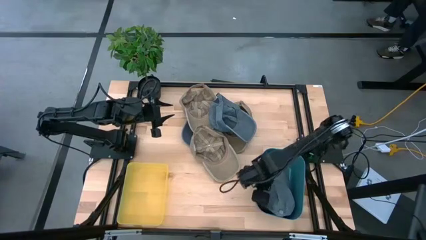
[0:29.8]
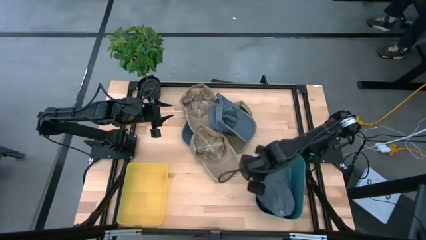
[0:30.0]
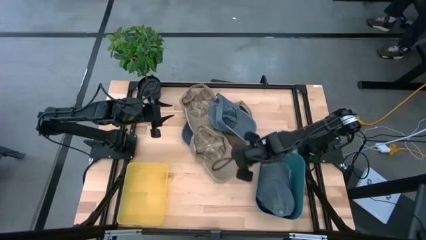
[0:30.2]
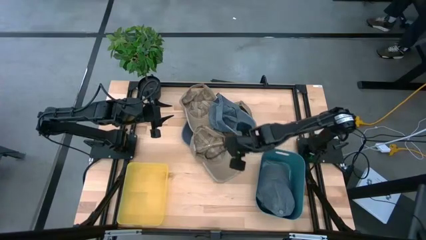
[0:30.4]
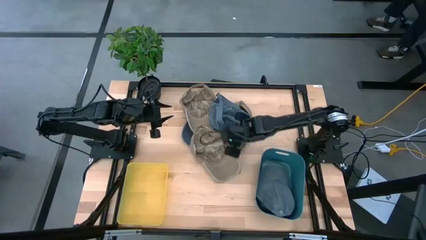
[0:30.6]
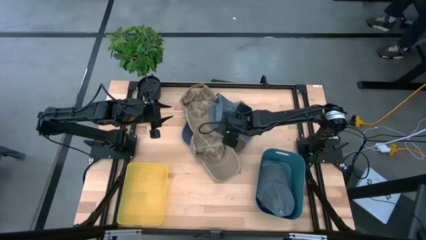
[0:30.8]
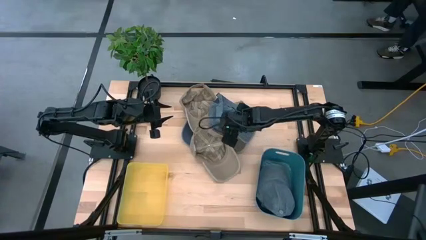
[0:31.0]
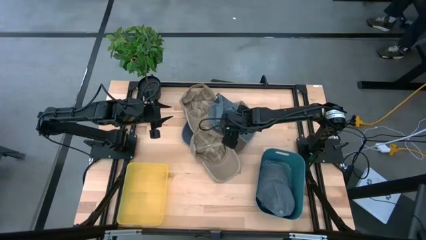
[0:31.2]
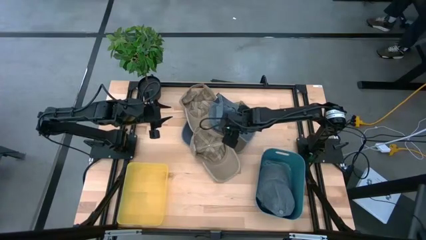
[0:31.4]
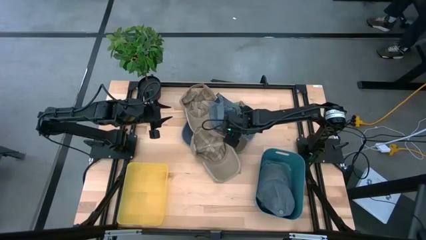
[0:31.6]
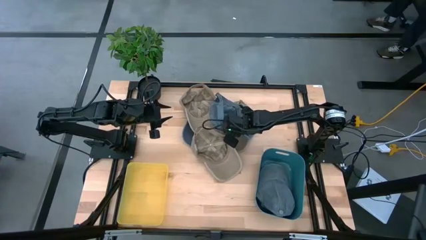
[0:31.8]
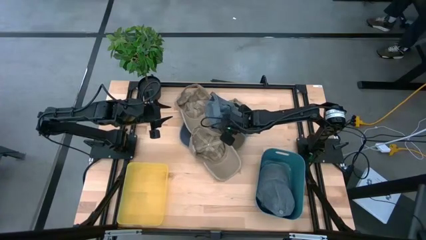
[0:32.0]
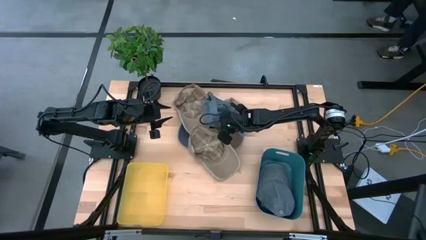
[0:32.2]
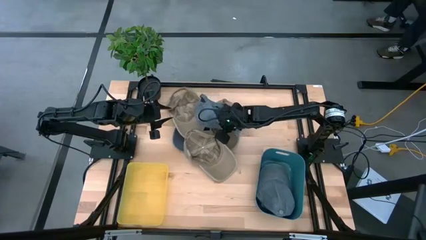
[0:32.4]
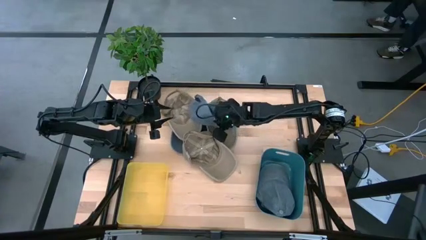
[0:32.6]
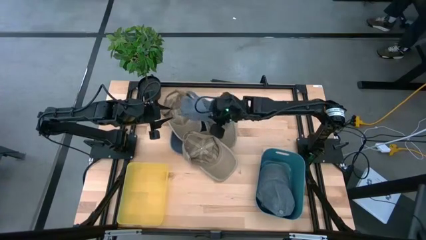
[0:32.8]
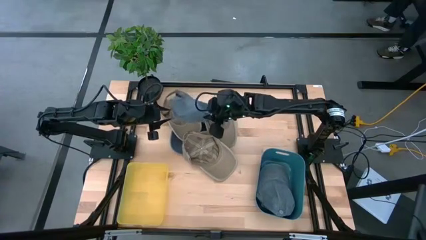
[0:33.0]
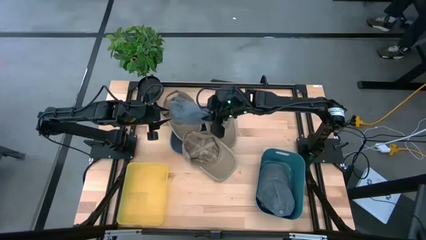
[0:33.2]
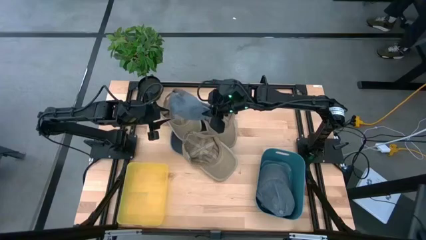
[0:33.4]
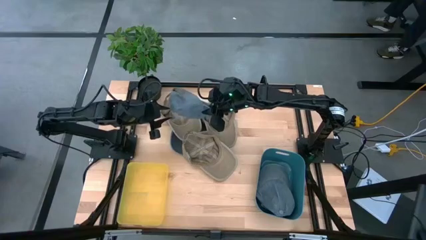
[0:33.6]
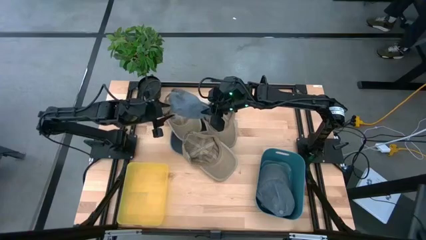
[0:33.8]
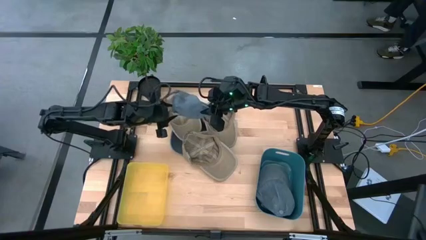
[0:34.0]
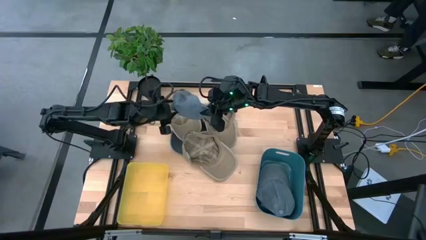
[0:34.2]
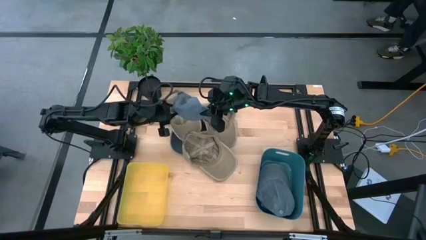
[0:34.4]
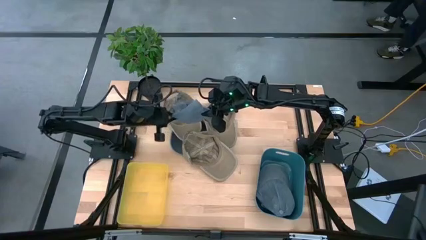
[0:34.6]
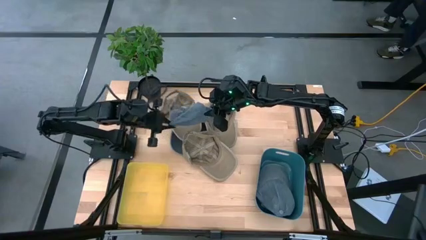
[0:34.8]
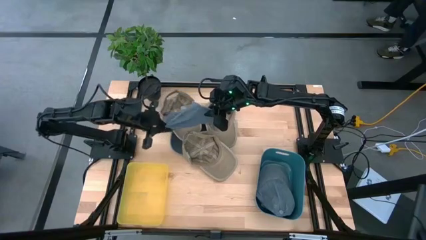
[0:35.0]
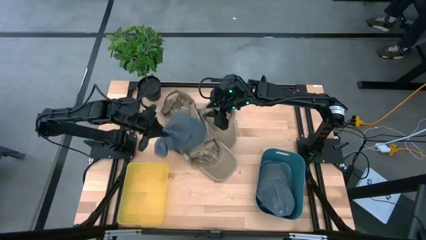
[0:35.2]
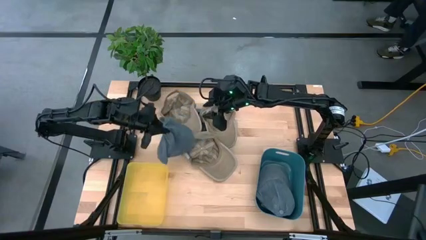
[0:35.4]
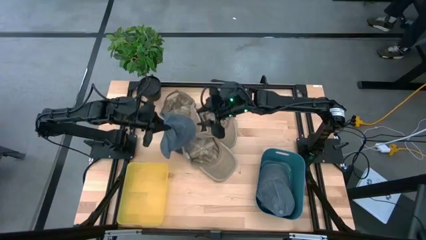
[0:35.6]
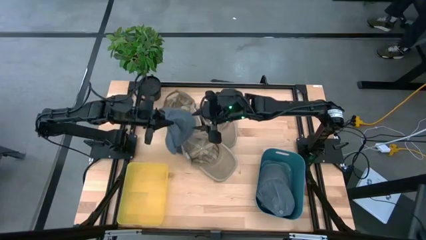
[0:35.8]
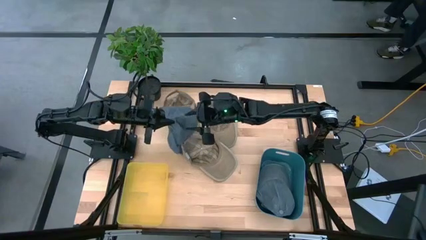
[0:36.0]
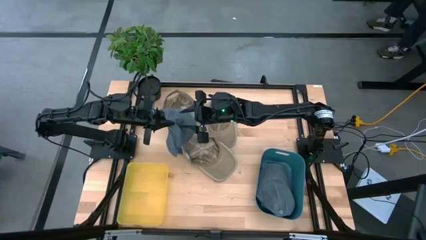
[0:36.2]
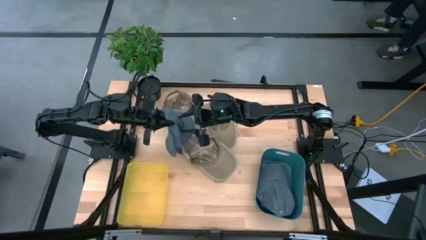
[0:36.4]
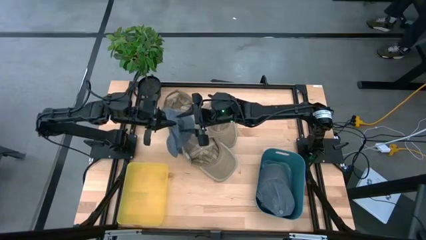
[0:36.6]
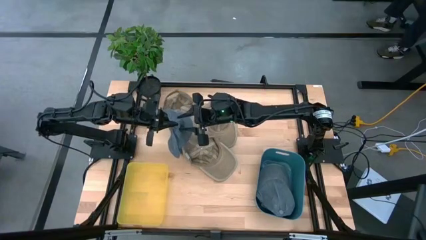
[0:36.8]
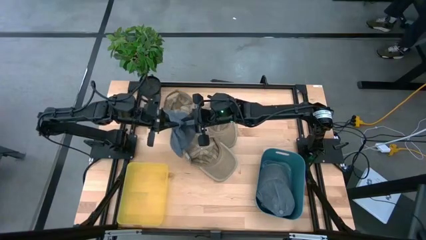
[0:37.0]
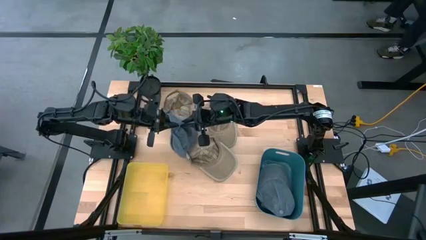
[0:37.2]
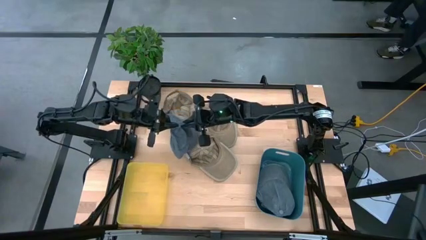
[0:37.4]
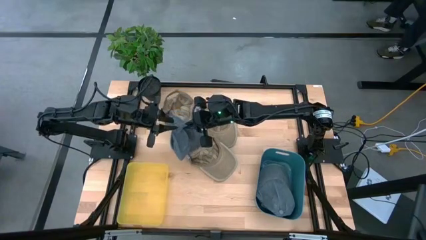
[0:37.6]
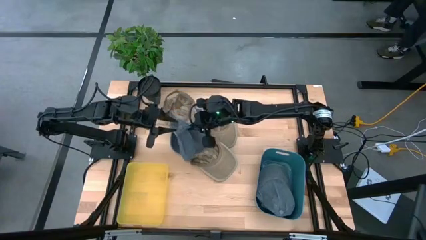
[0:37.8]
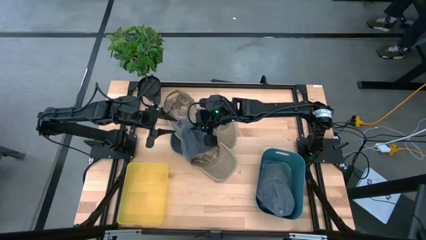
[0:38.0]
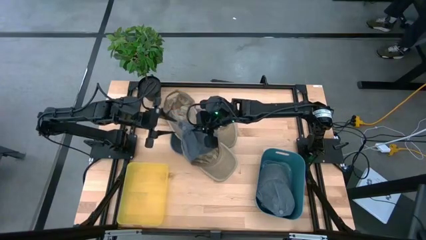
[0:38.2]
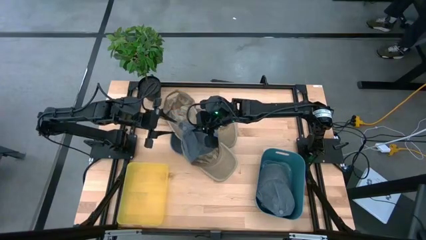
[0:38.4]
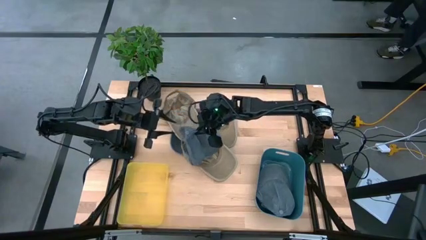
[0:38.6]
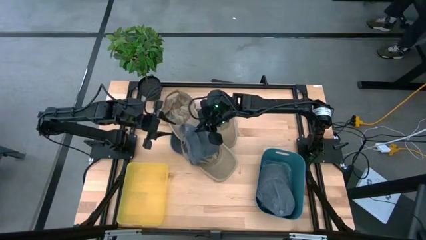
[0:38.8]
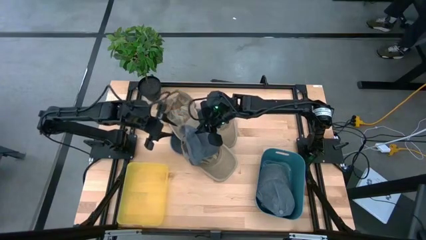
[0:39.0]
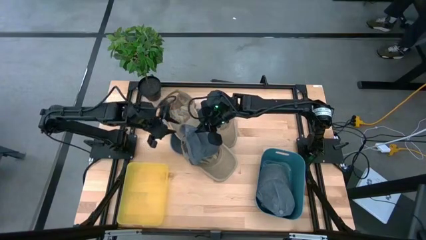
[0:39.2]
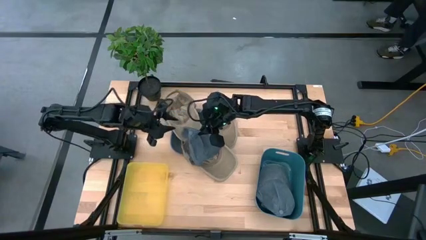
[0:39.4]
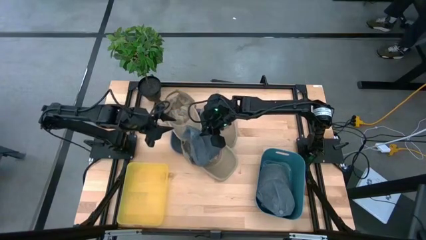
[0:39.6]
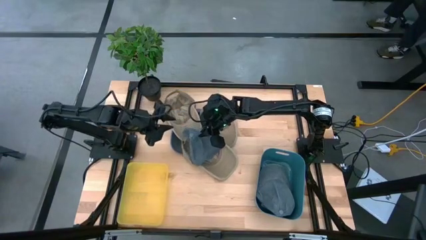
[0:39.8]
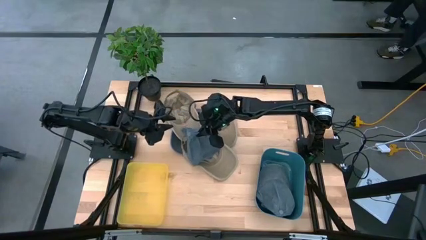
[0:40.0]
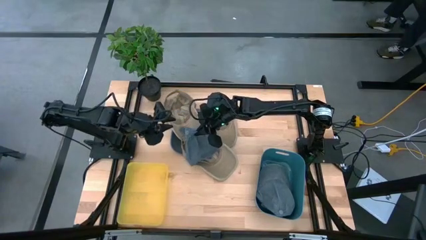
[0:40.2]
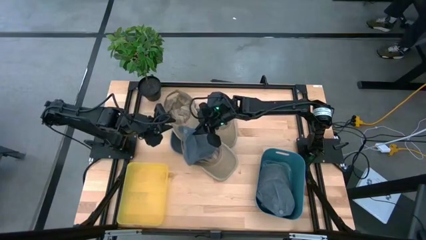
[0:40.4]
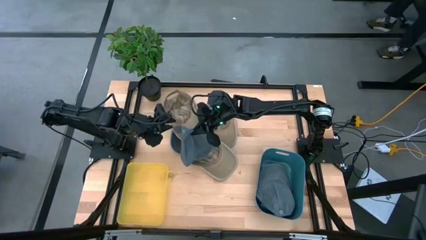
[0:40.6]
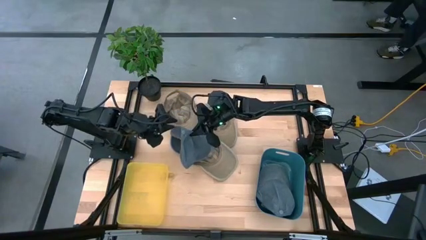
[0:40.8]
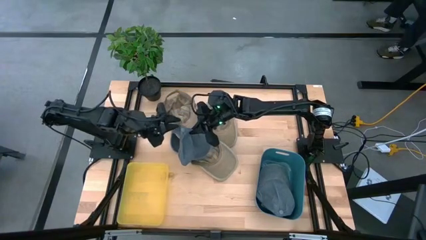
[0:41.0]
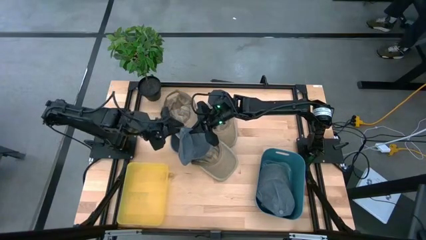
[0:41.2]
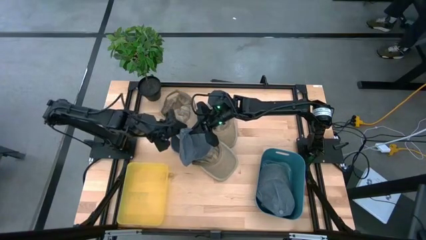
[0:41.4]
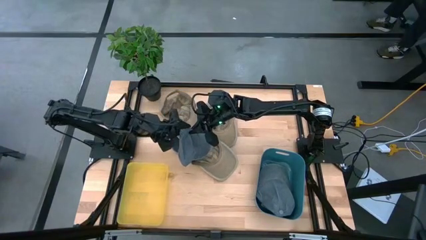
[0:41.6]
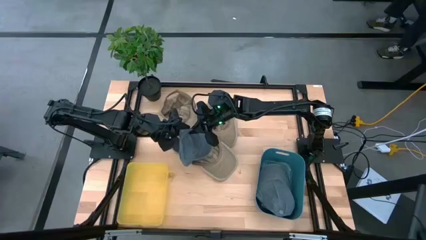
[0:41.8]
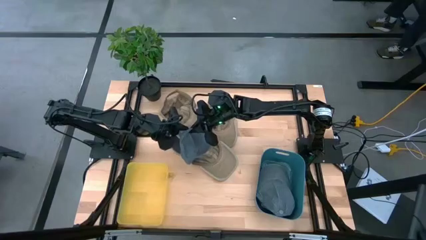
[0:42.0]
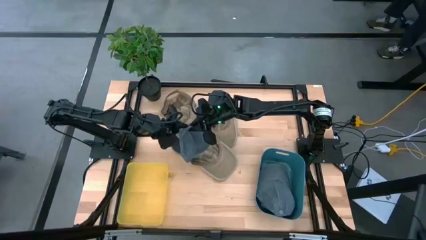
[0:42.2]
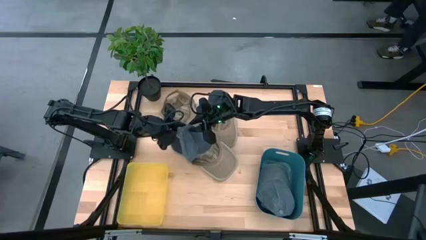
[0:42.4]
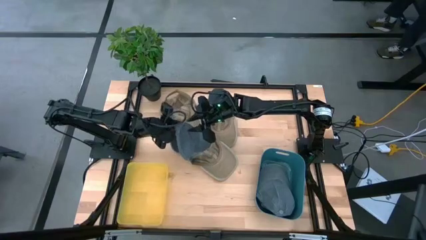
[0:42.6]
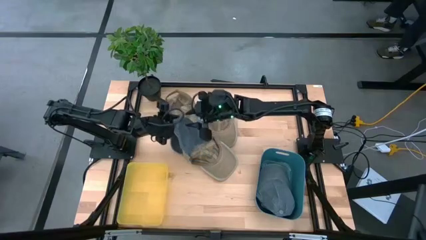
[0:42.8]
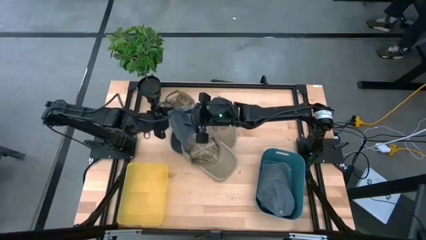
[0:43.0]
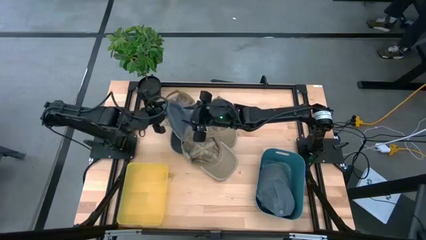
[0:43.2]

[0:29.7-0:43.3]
Task: Pick & Place hat
Put the right blue cap into the blue bin
